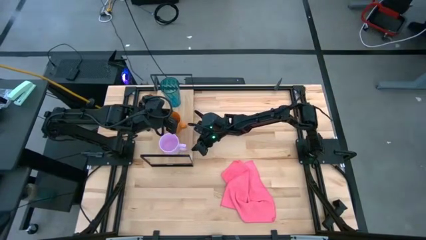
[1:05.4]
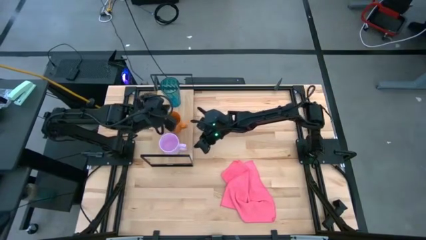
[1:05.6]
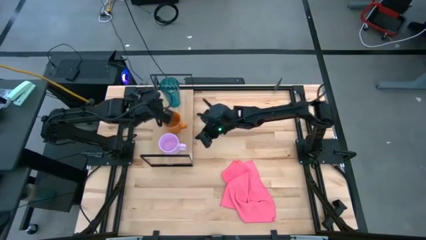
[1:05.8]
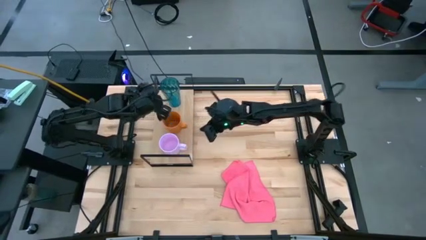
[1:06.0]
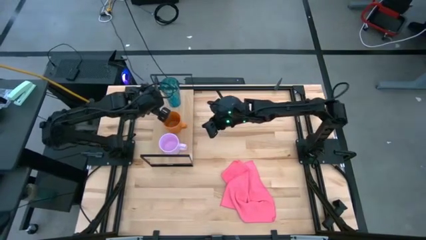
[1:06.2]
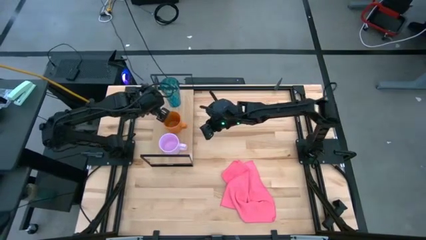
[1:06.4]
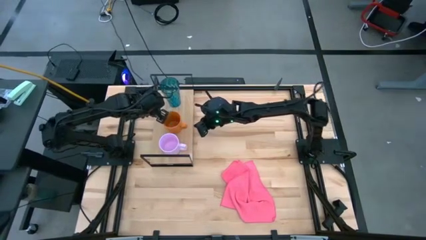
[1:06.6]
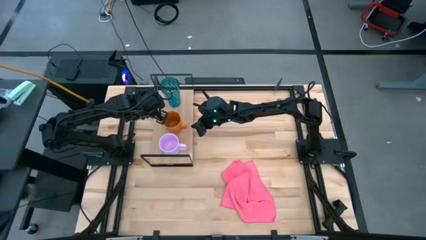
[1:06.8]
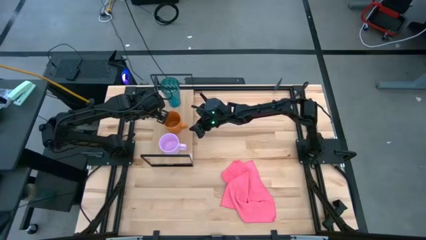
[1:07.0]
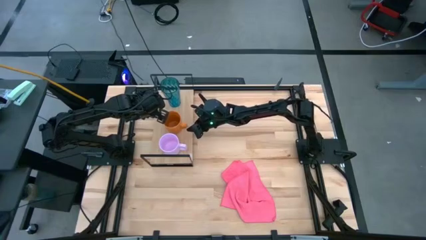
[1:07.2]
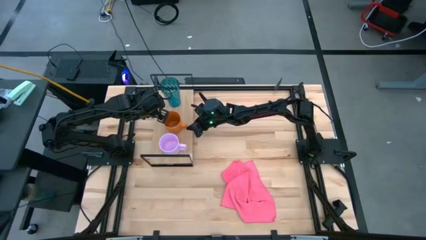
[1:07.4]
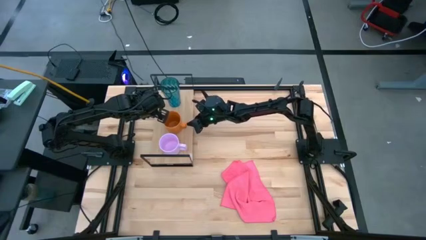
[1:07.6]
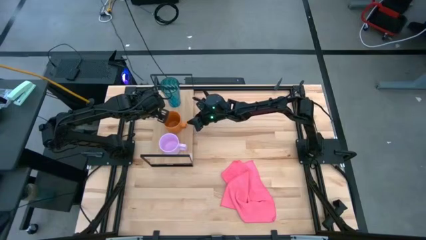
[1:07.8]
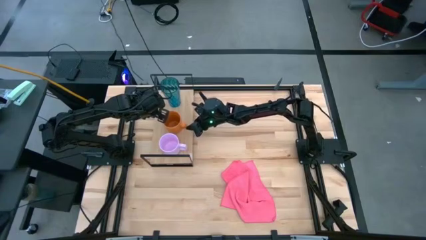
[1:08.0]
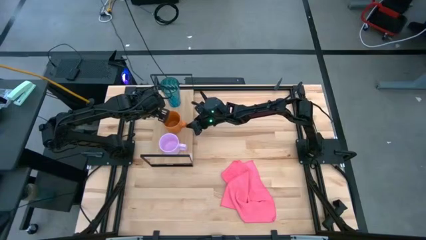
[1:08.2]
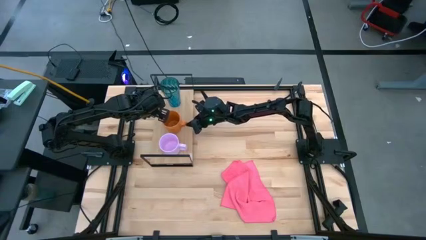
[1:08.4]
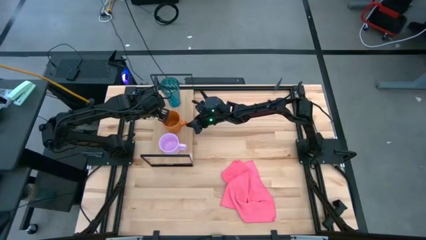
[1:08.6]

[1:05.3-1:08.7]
Task: Stack small to large cups/mugs on shelf
Adjust the orange mug on the shelf

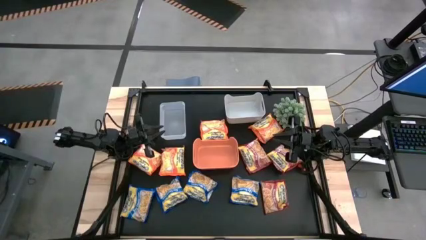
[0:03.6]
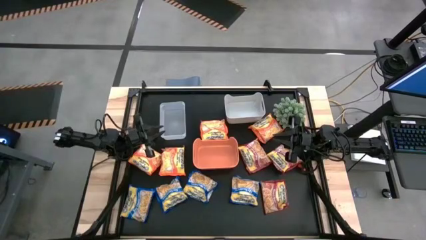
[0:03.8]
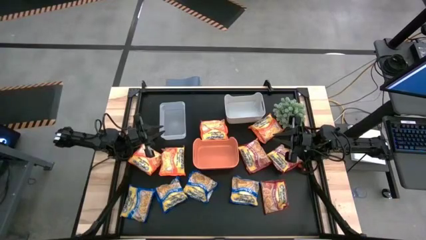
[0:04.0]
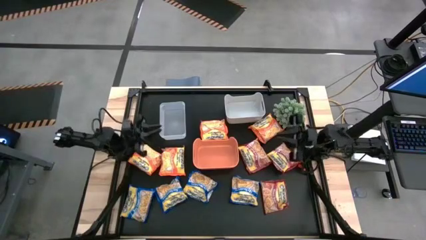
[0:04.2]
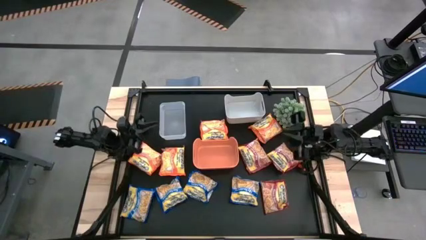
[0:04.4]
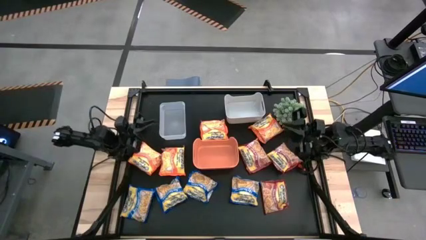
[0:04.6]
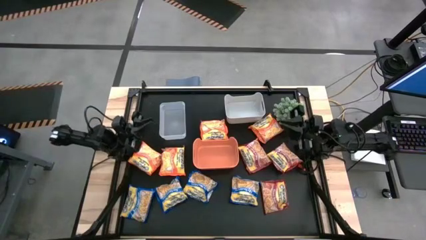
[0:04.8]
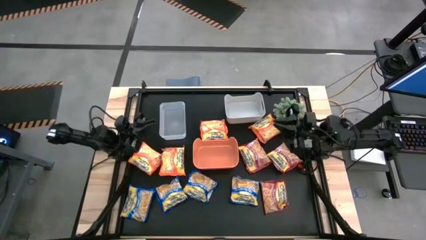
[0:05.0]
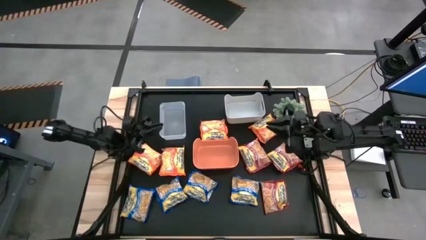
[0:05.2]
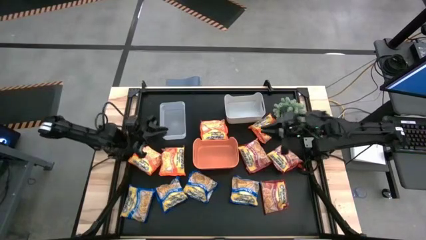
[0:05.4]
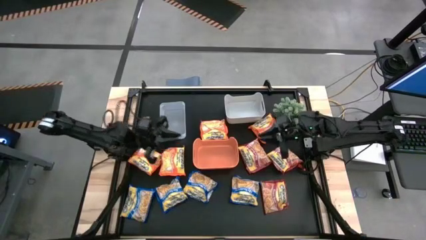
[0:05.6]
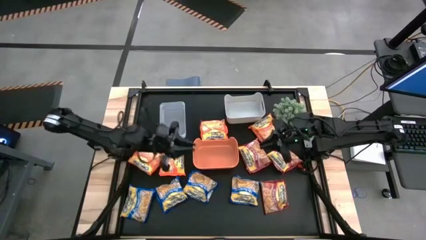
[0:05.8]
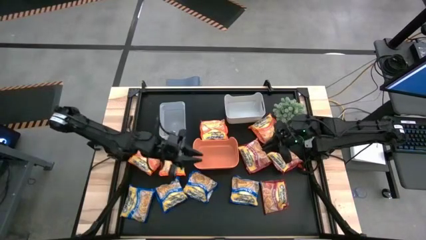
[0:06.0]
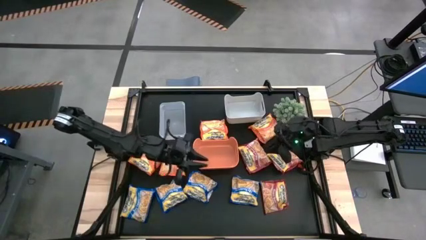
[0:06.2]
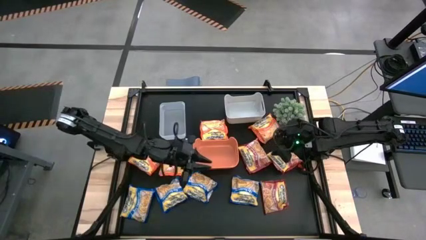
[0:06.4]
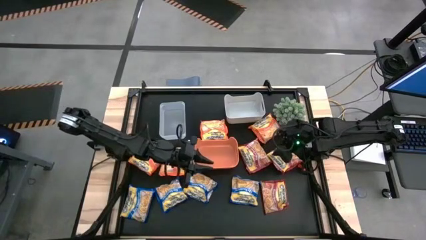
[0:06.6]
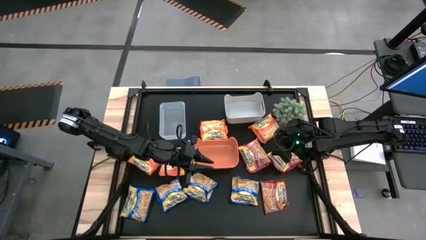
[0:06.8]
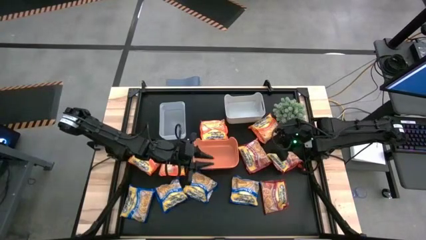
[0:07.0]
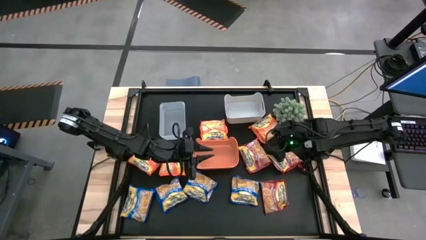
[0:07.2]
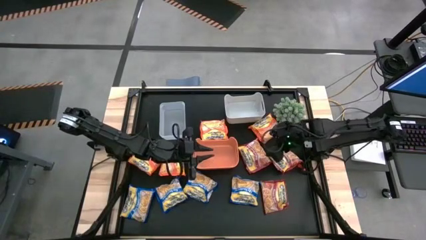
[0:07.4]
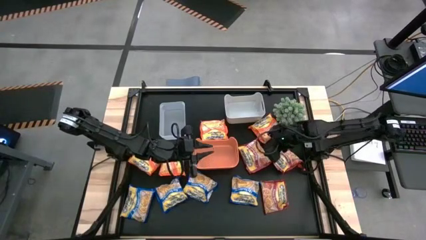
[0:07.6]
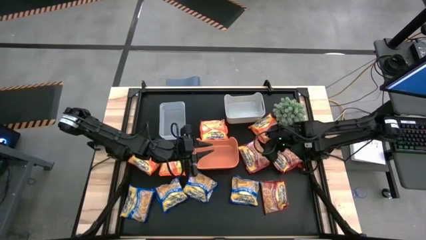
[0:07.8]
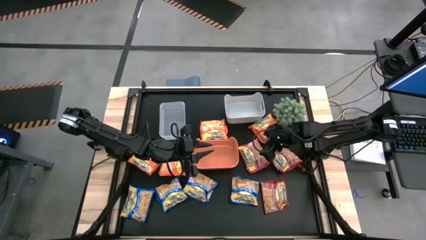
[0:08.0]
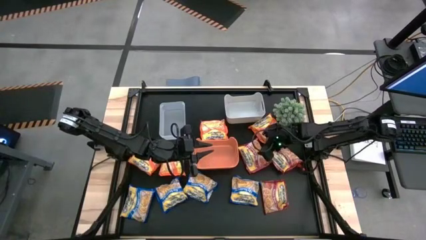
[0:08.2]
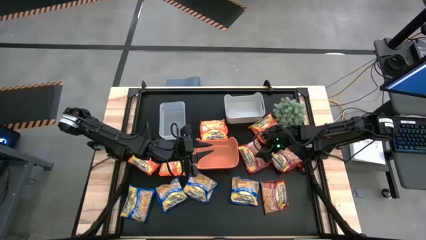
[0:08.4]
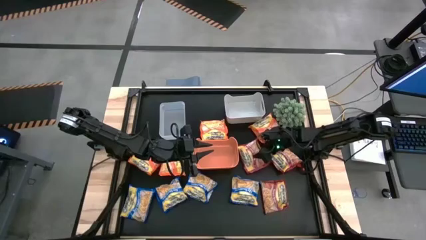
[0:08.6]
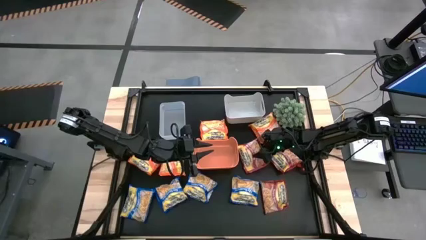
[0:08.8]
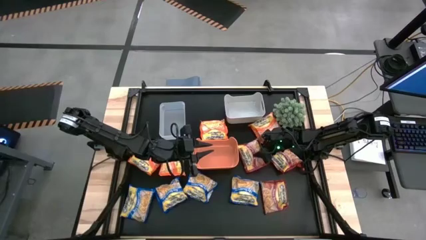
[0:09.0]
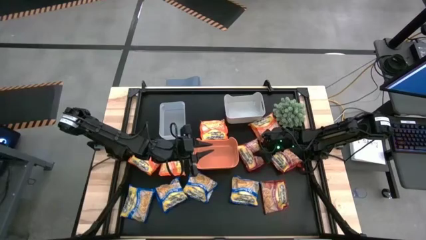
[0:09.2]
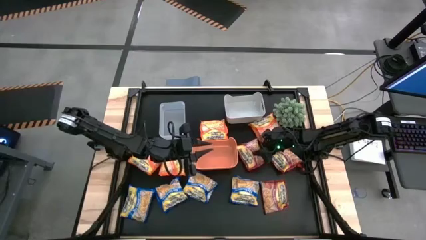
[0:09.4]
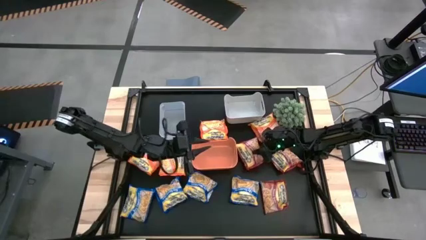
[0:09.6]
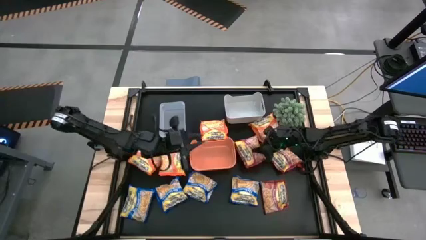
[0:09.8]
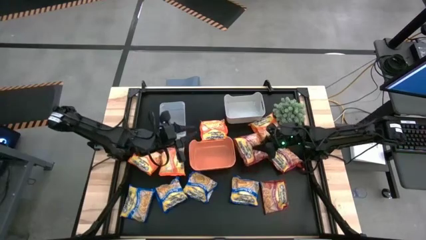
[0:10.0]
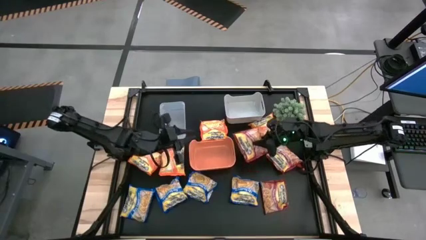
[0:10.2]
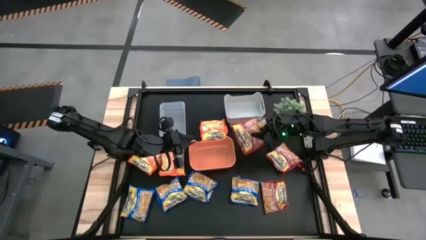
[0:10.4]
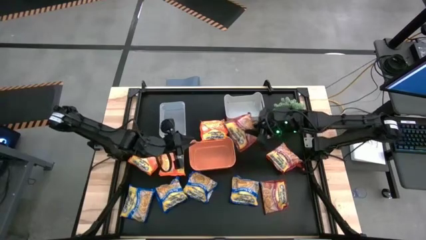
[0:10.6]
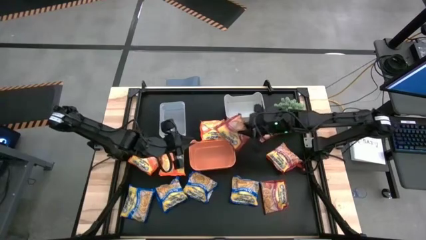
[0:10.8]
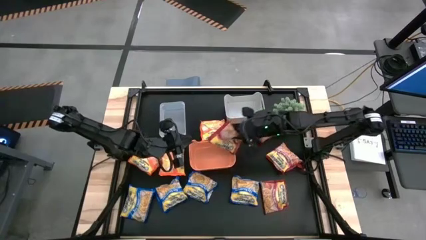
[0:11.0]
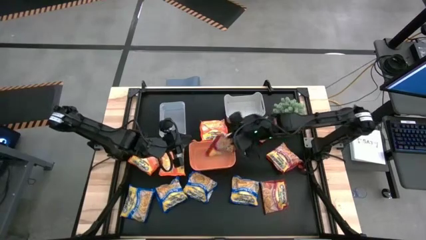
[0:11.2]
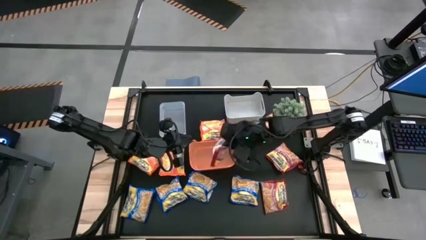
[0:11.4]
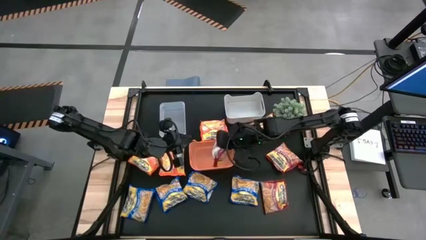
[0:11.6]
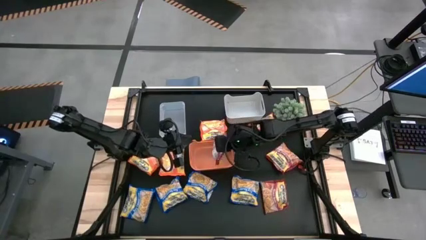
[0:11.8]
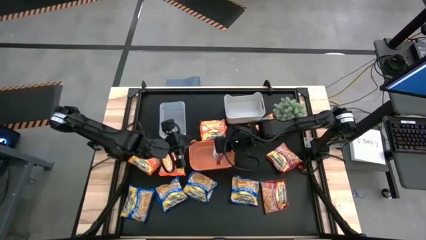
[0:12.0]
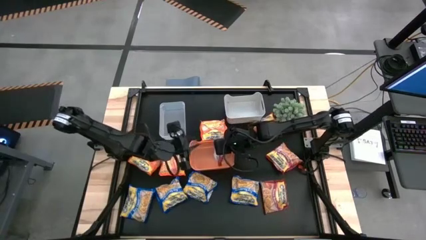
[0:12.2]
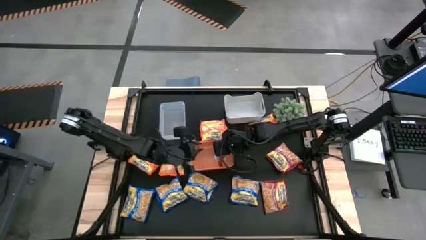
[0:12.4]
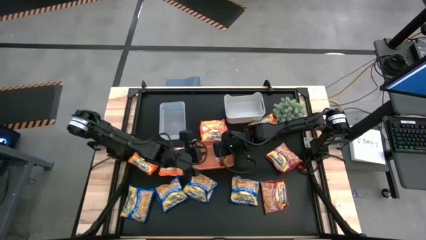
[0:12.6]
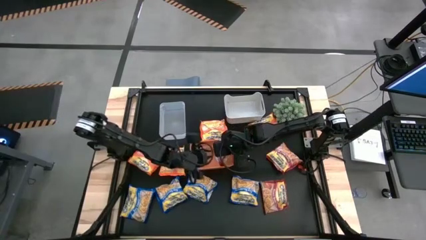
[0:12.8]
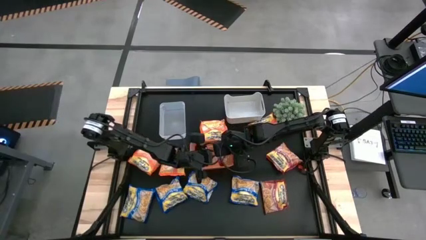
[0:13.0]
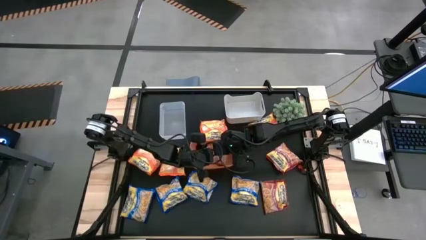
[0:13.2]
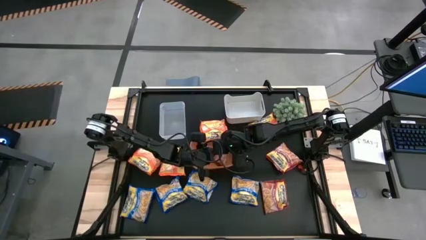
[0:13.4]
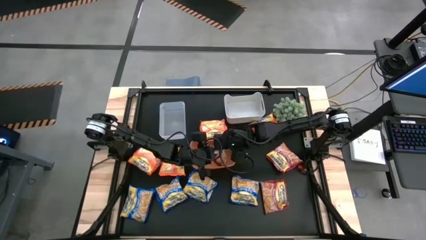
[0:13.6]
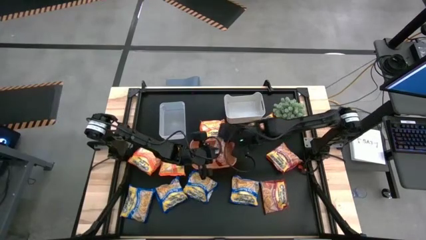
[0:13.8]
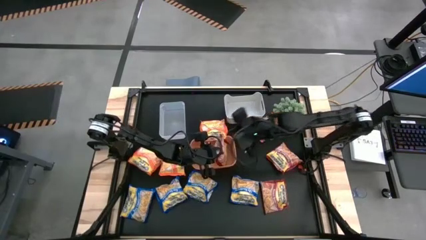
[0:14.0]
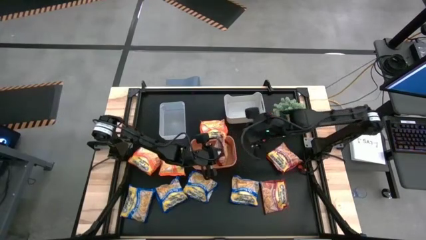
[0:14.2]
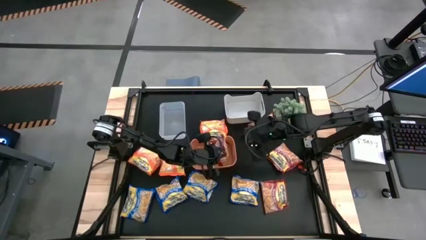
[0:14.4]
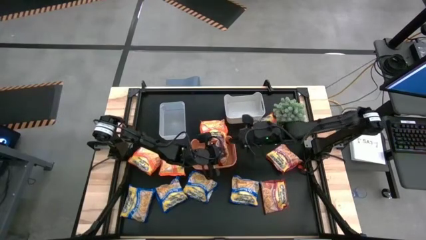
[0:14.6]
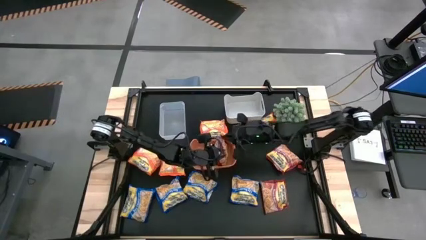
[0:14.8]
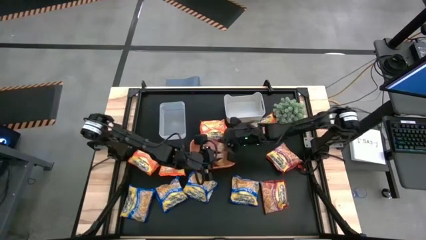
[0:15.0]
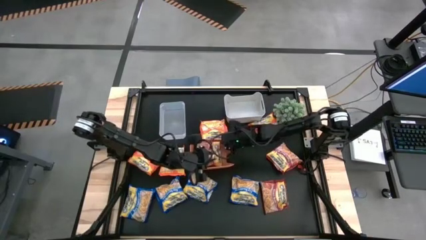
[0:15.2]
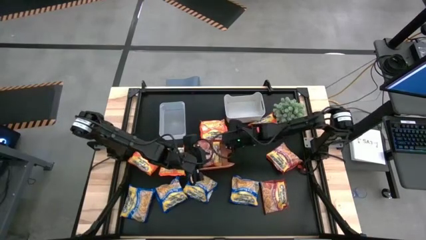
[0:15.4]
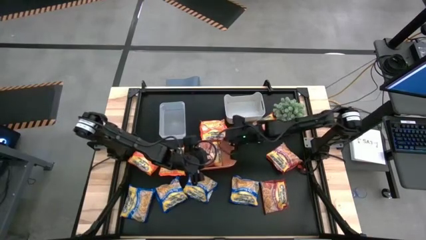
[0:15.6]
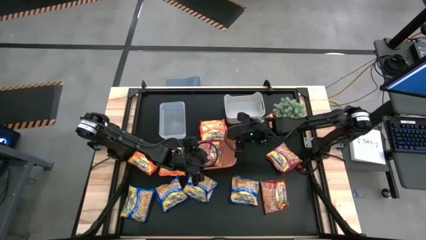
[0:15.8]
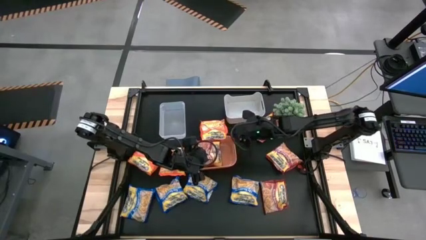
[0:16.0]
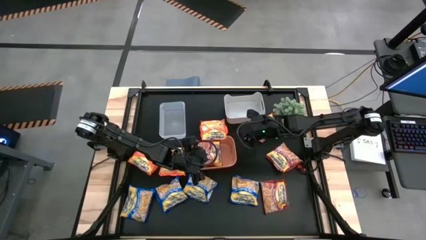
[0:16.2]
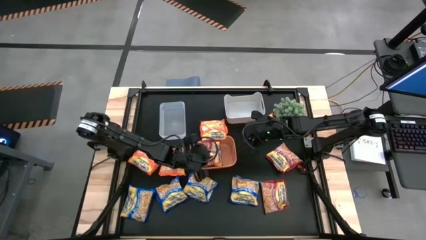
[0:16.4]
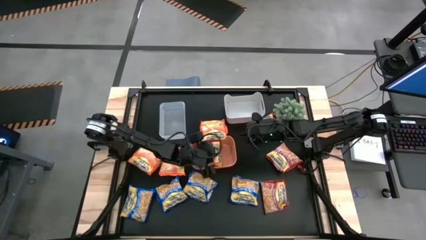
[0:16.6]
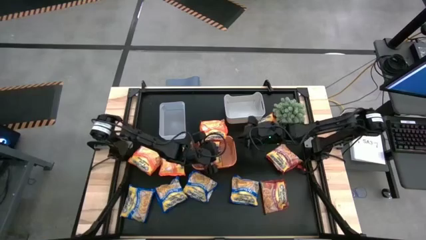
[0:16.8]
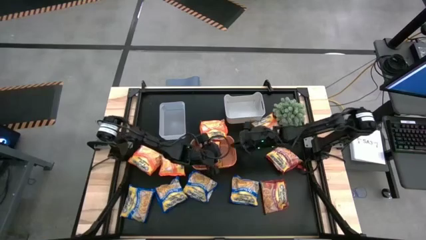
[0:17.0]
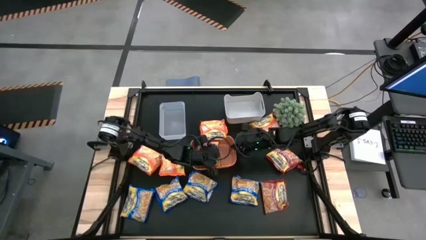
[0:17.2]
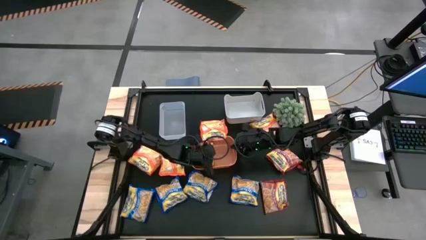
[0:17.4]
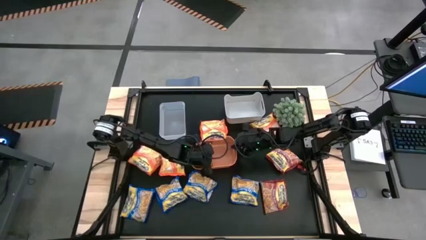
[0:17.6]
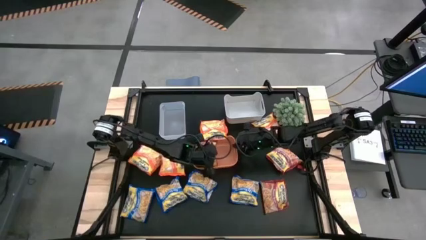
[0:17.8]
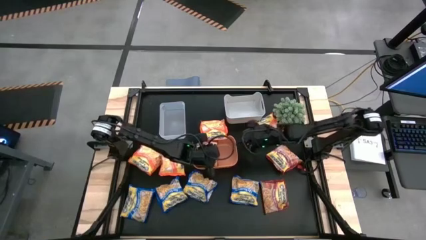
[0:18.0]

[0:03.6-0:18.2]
Task: Sort Maruchan noodles
Put the red noodle packet into the orange bin
